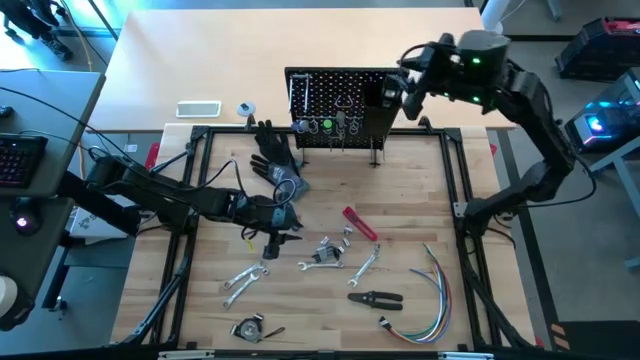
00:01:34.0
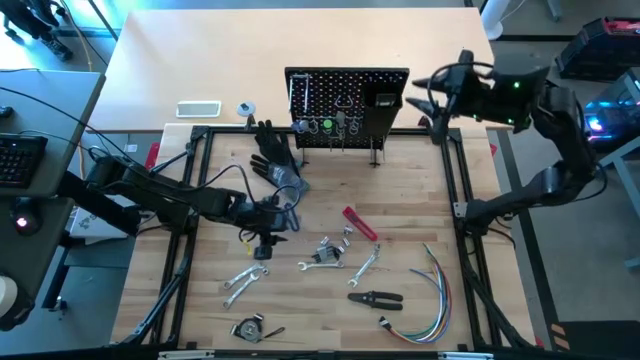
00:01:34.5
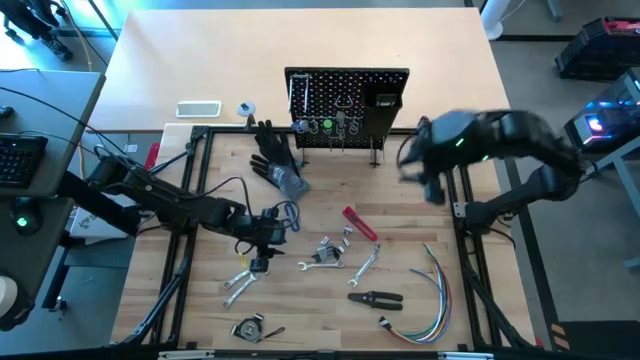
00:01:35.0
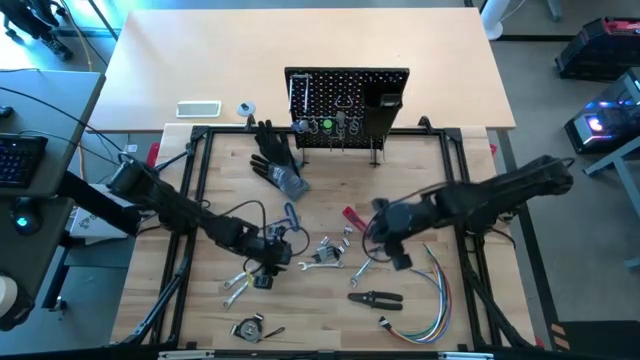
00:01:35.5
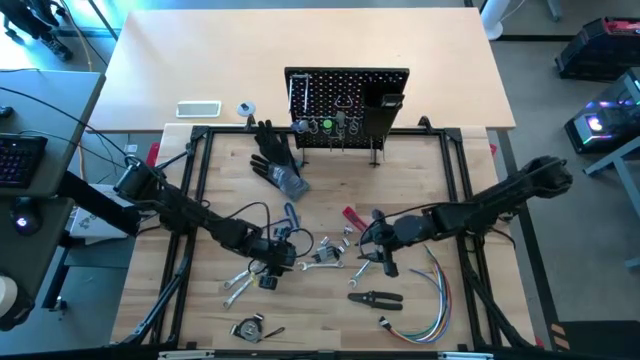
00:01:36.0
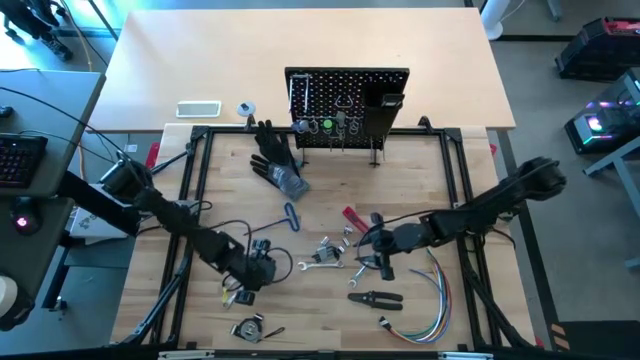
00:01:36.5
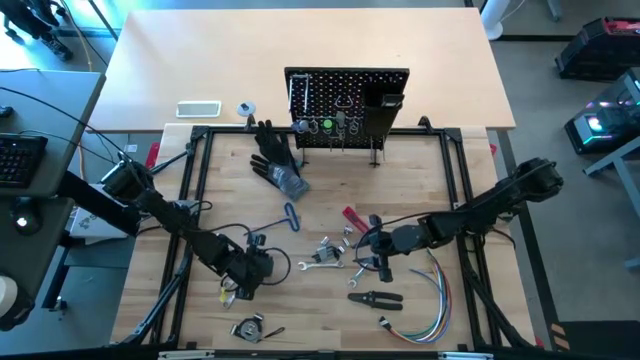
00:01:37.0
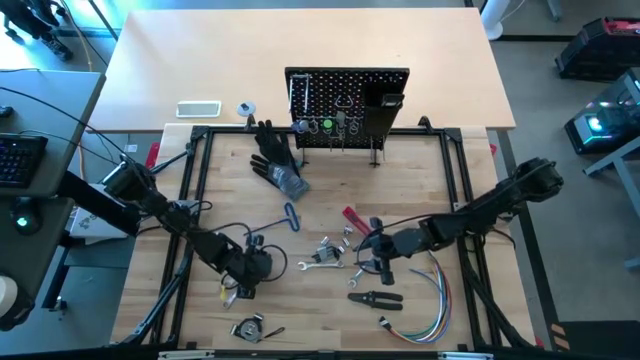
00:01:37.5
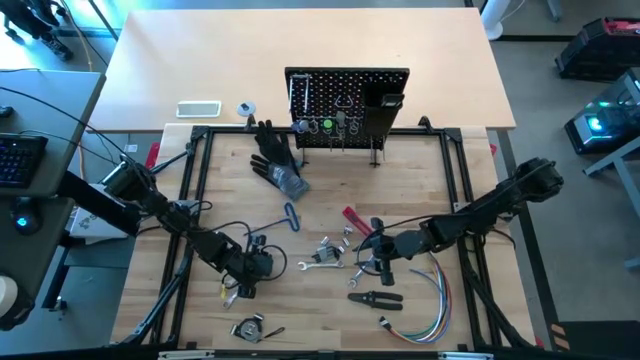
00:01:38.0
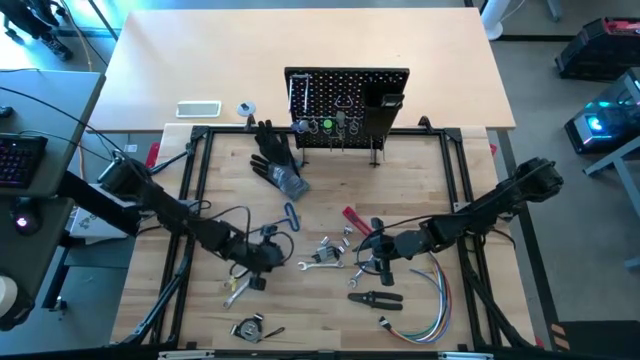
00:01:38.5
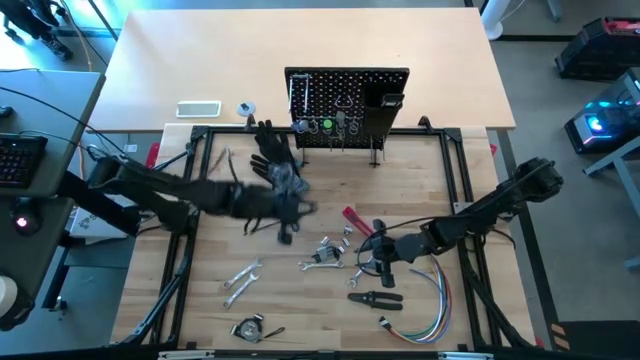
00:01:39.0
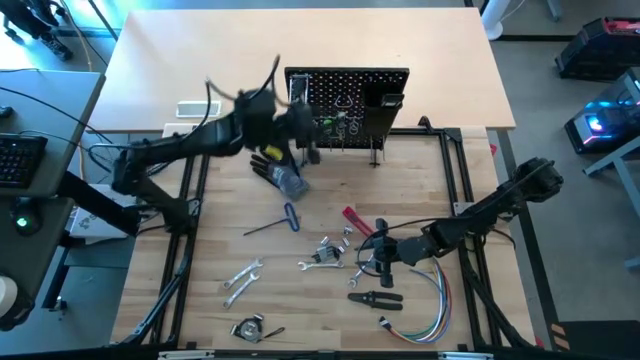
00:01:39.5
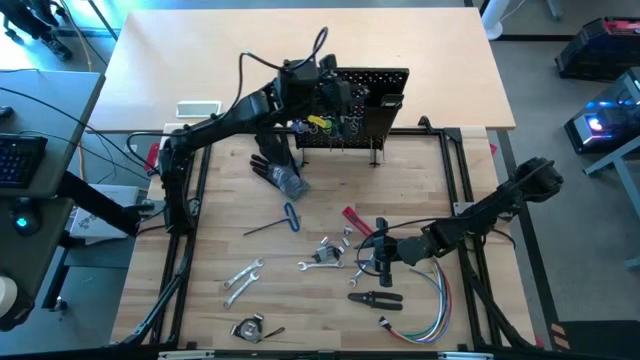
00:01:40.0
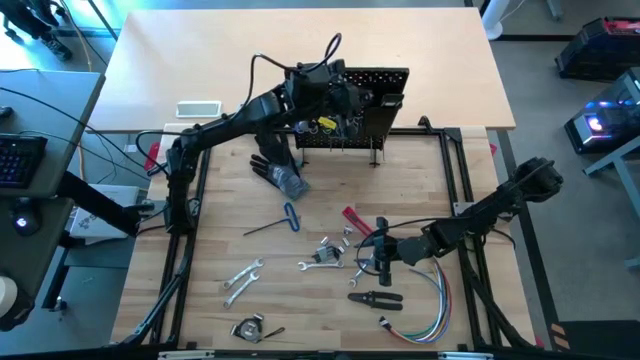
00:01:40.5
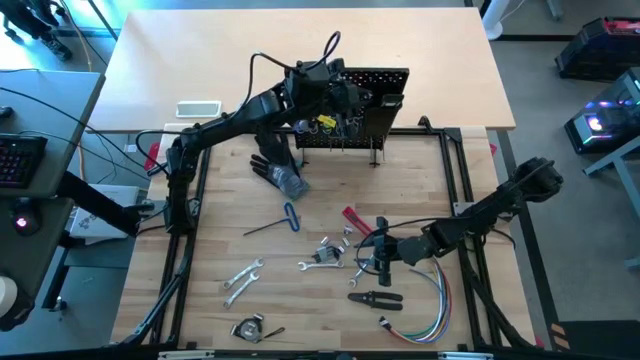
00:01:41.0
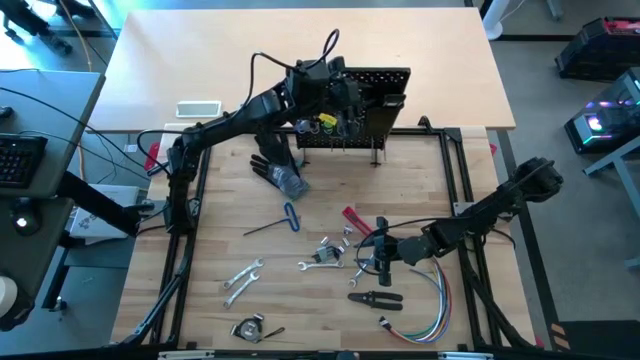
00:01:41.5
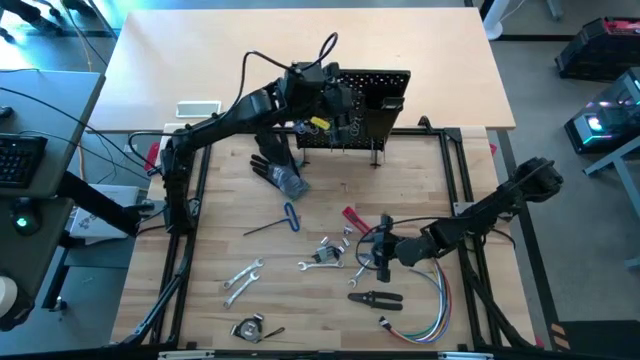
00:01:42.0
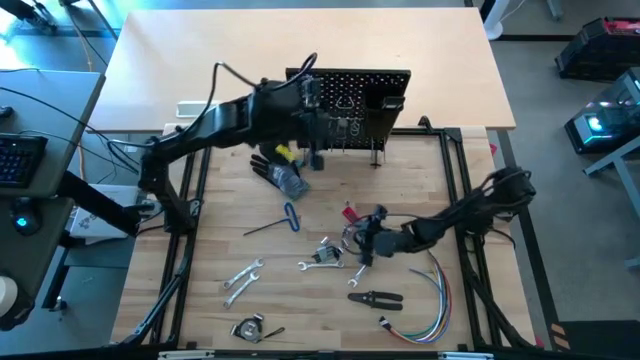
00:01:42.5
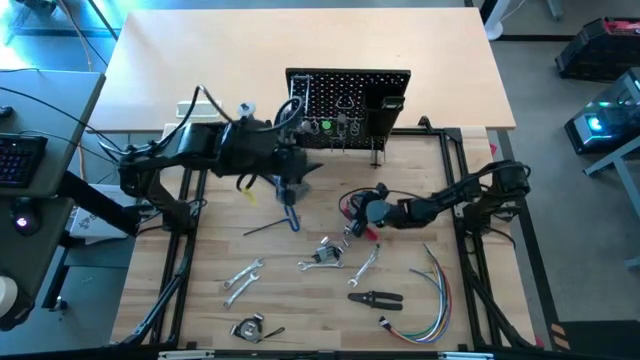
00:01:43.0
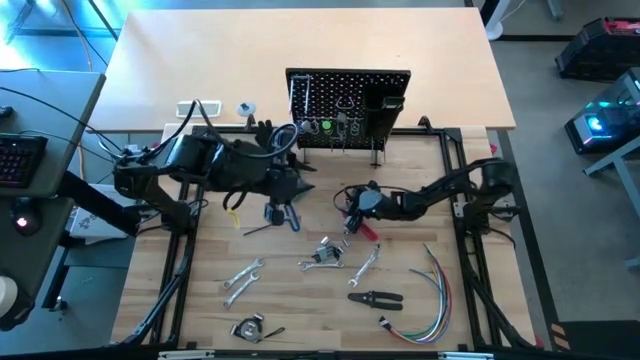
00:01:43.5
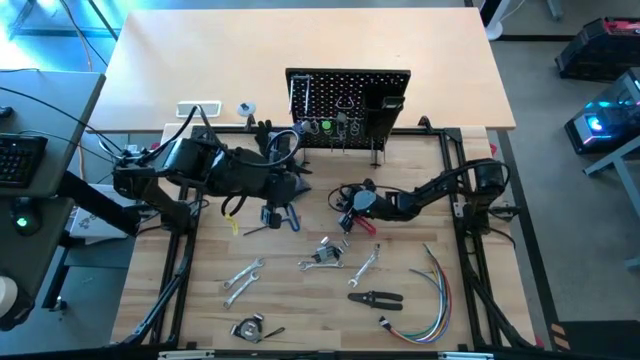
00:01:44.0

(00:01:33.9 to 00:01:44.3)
Task: Hang tools onto peg board
Put the silver socket into the black bin on the pegboard

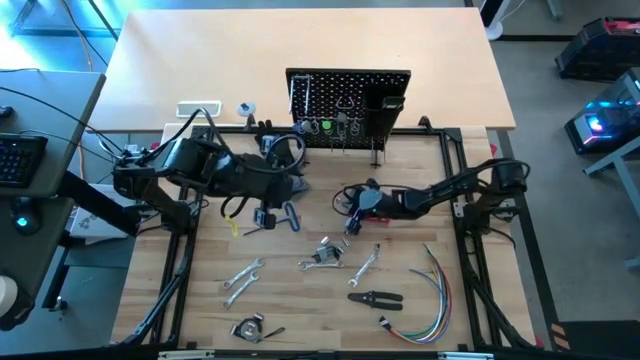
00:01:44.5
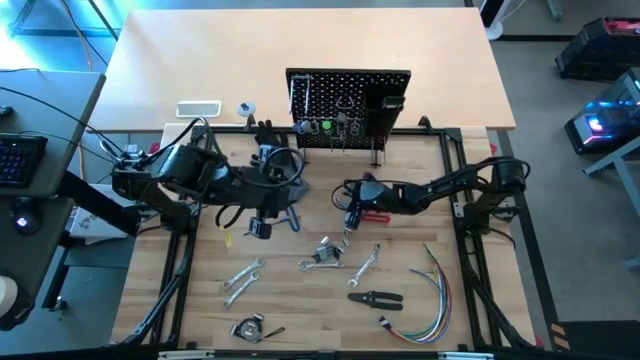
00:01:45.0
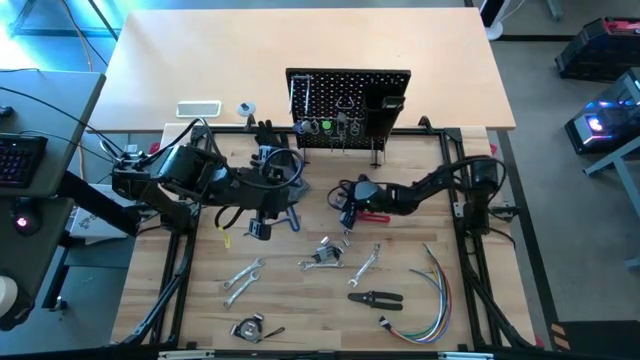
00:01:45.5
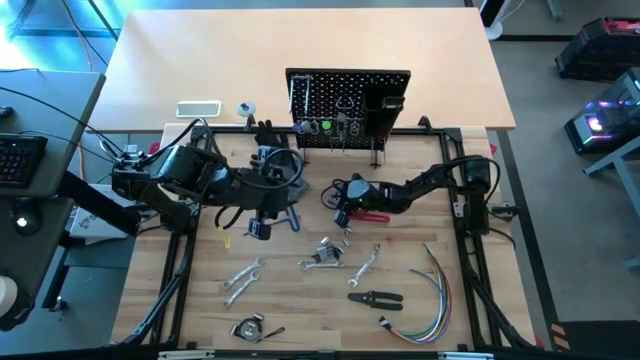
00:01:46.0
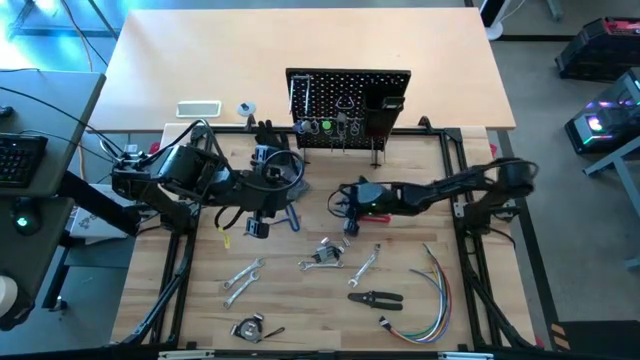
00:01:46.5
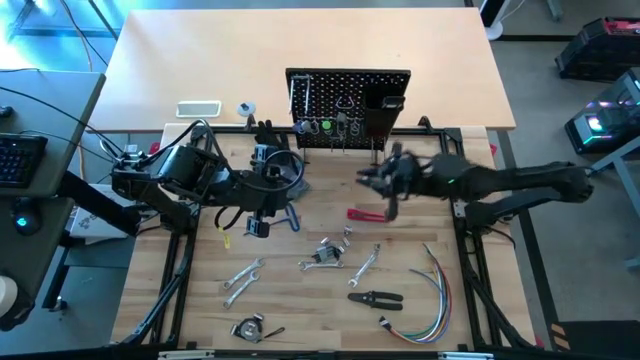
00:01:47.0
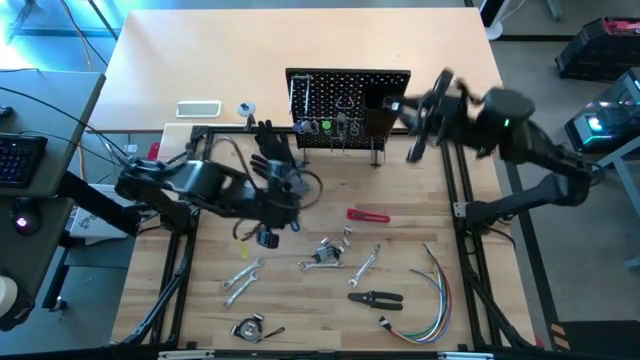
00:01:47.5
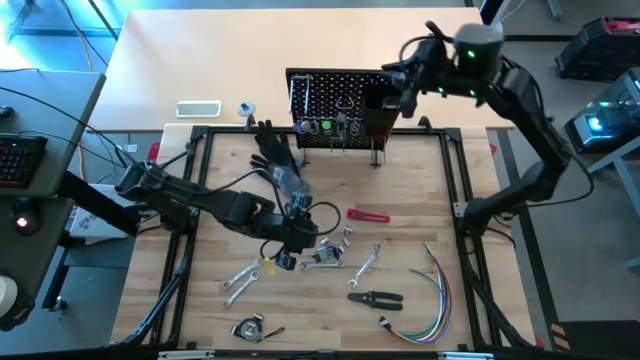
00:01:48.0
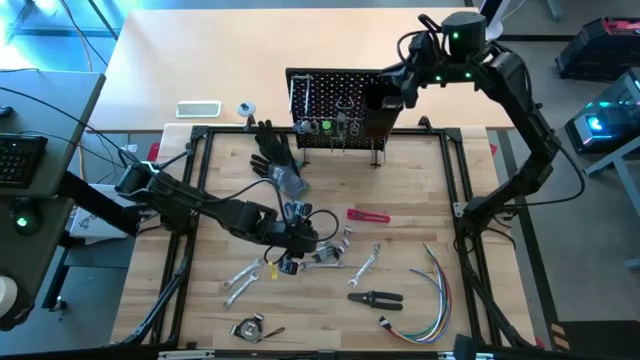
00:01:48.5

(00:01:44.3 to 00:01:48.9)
Put the silver socket into the black bin on the pegboard

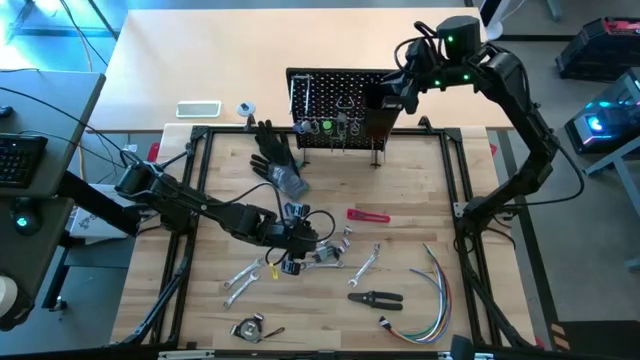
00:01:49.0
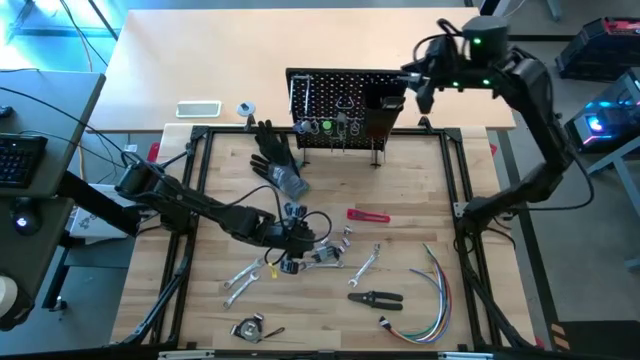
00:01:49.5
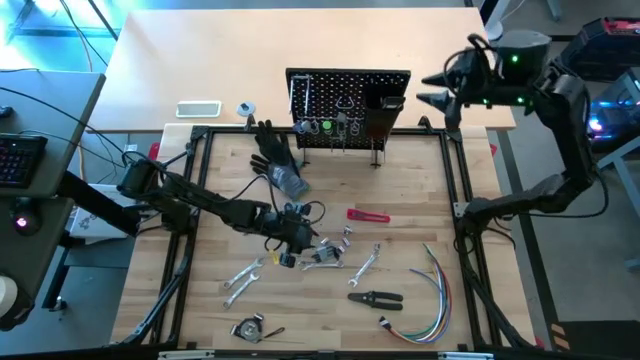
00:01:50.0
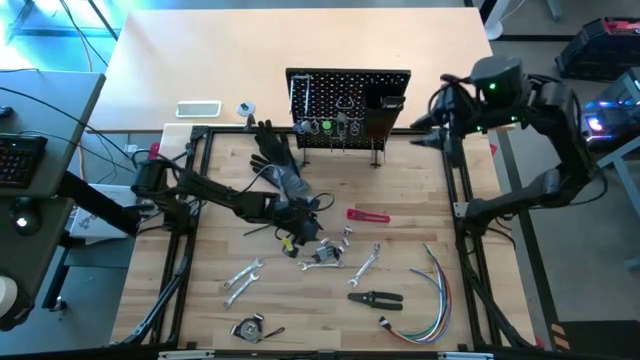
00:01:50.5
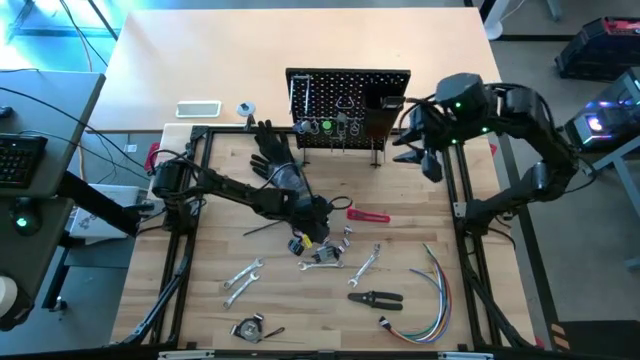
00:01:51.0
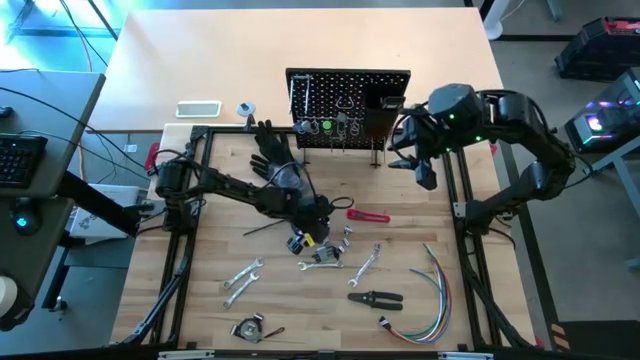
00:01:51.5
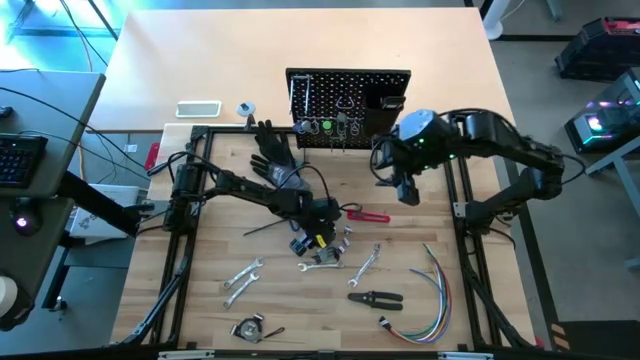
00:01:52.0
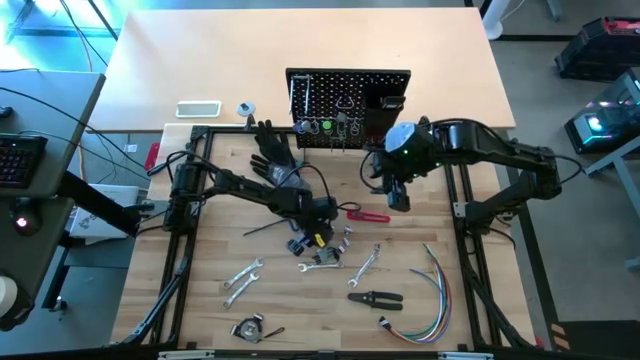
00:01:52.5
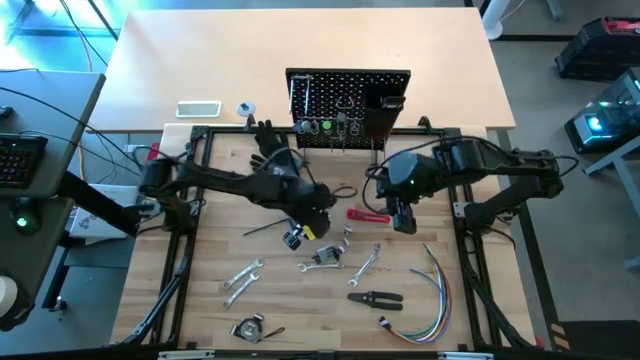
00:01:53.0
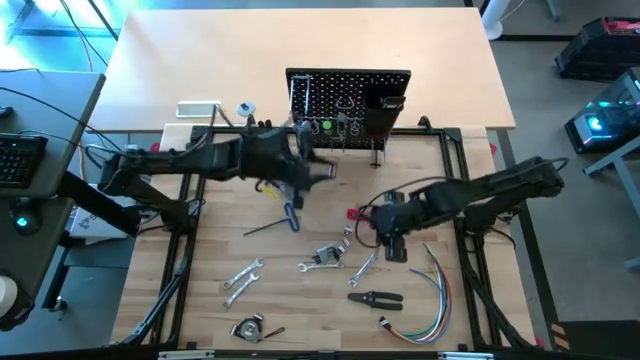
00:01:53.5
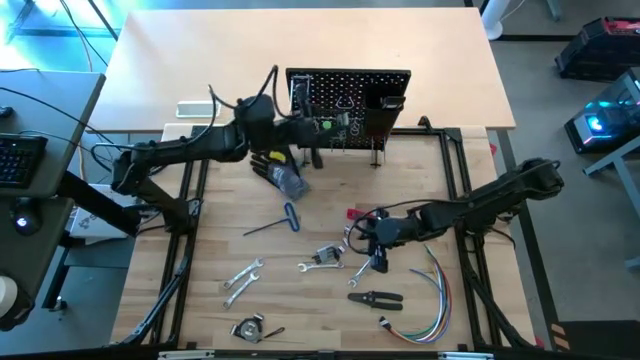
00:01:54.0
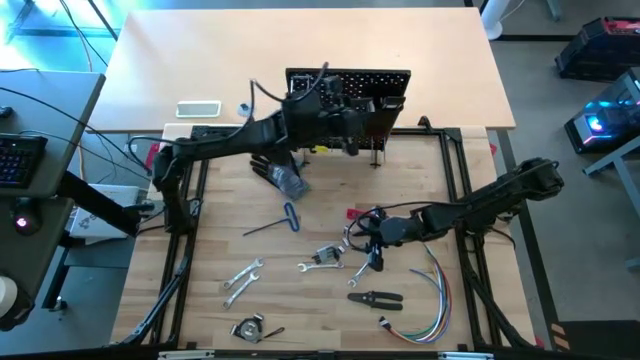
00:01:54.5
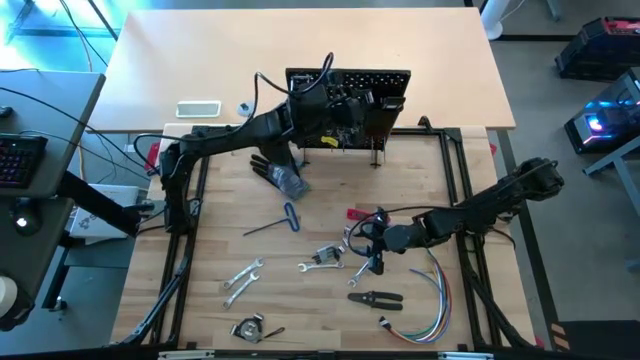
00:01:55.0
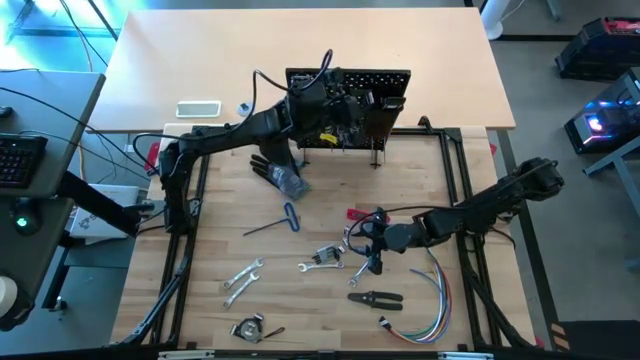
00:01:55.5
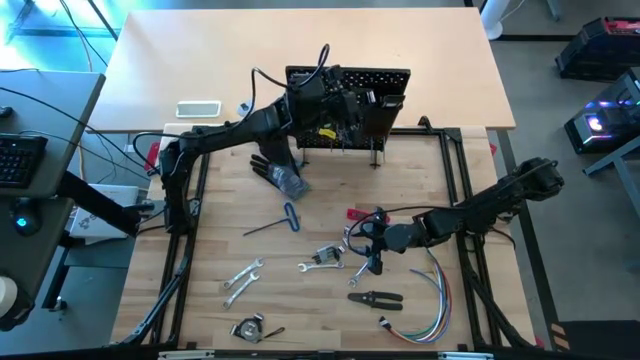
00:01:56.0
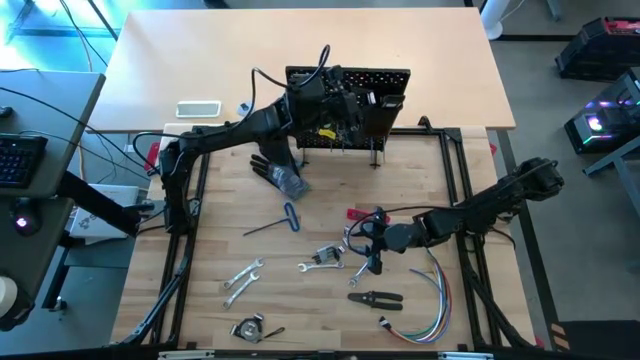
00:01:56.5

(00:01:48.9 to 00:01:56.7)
Put the silver socket into the black bin on the pegboard
